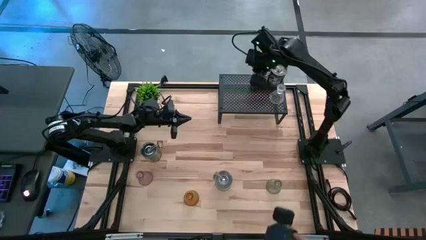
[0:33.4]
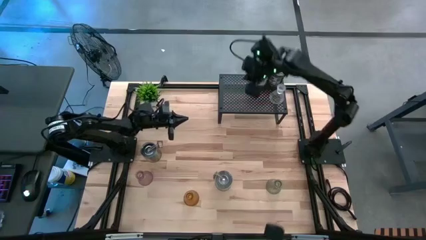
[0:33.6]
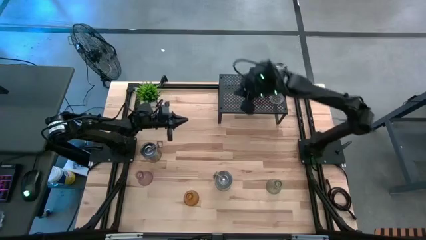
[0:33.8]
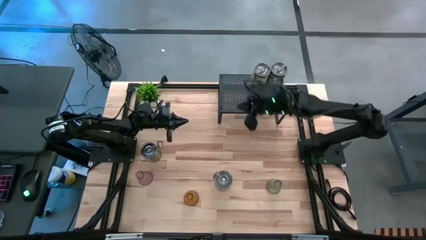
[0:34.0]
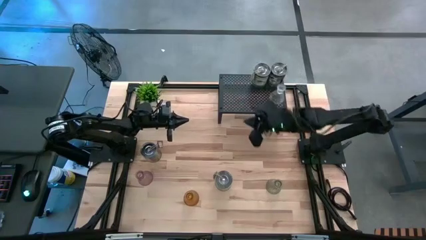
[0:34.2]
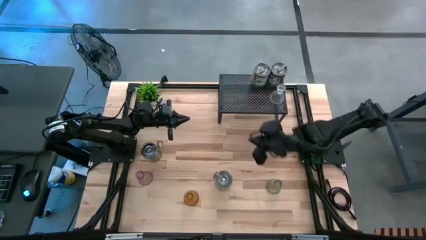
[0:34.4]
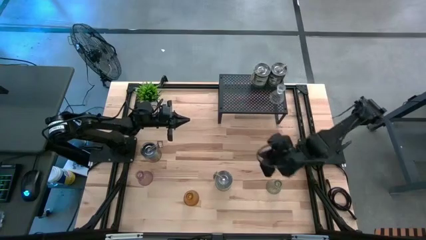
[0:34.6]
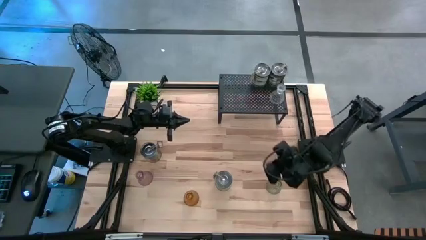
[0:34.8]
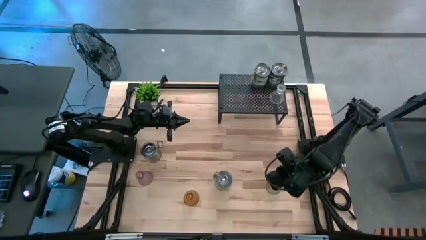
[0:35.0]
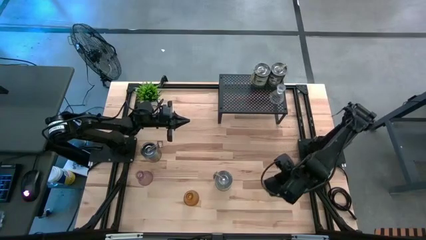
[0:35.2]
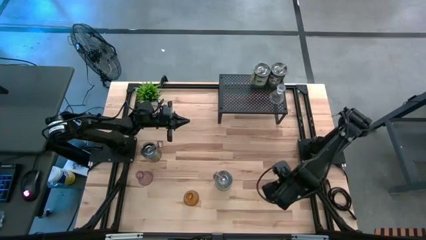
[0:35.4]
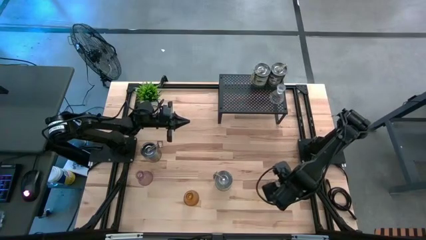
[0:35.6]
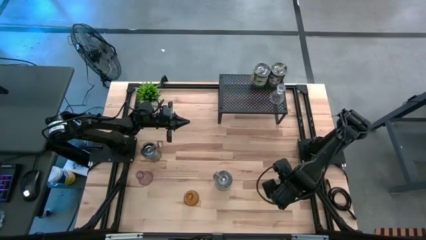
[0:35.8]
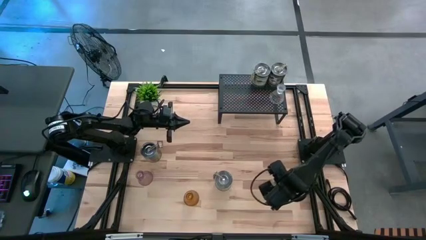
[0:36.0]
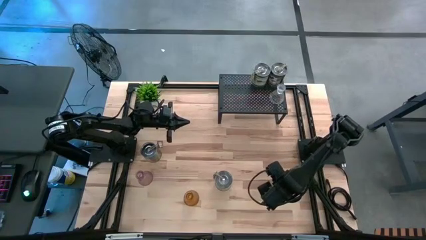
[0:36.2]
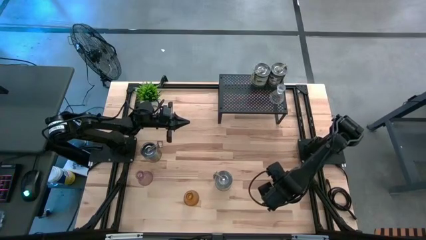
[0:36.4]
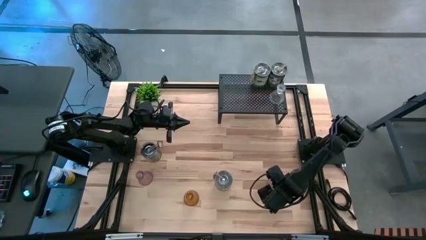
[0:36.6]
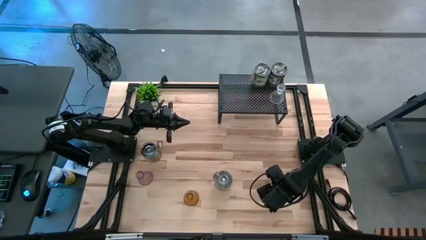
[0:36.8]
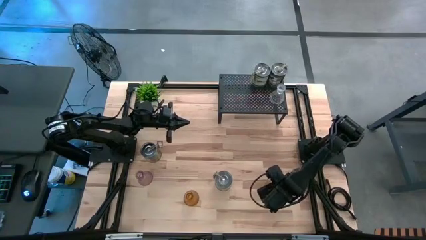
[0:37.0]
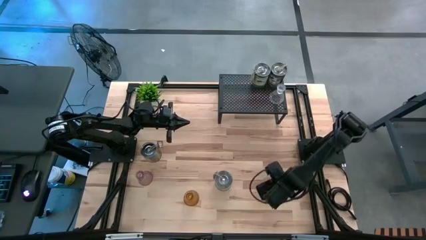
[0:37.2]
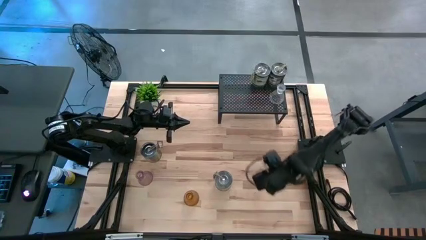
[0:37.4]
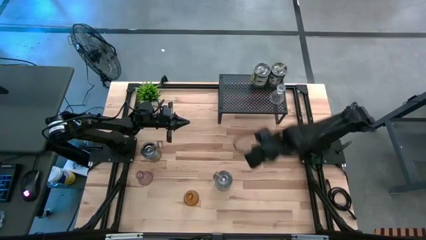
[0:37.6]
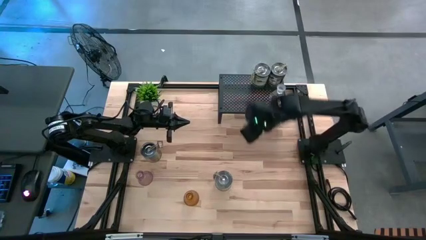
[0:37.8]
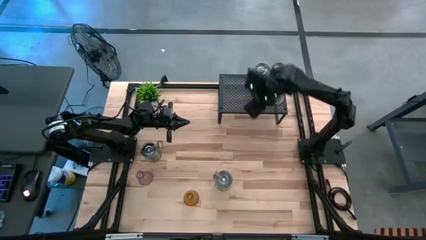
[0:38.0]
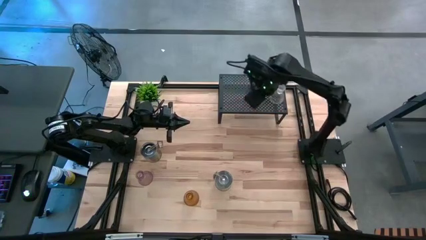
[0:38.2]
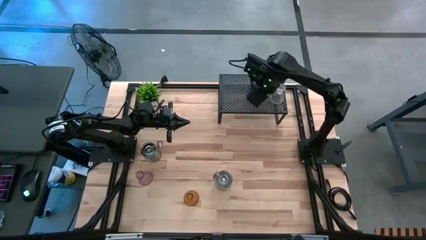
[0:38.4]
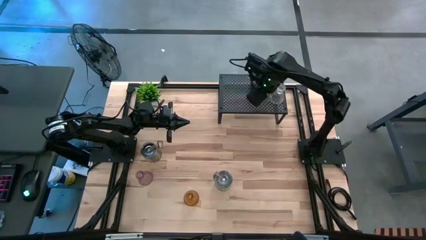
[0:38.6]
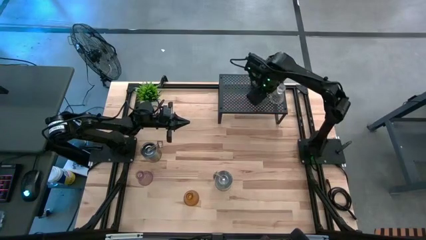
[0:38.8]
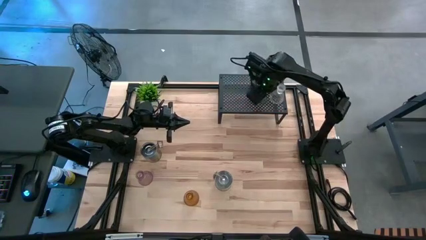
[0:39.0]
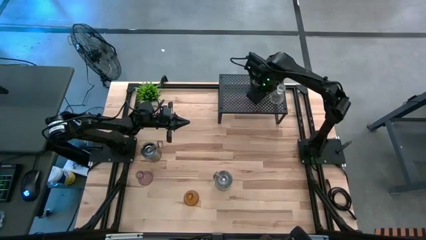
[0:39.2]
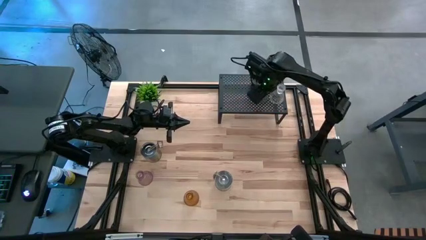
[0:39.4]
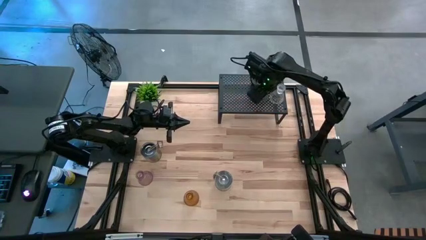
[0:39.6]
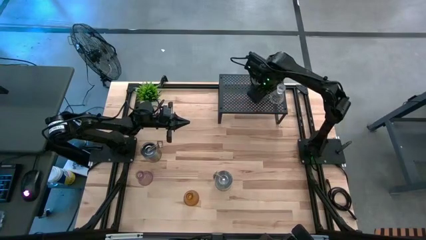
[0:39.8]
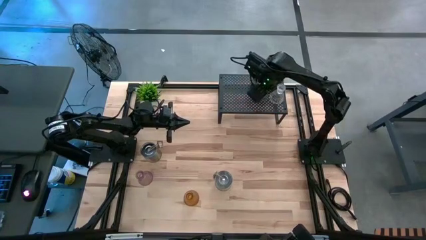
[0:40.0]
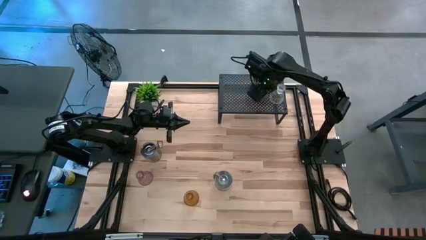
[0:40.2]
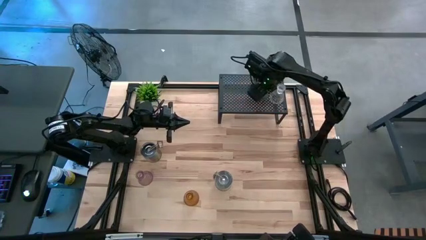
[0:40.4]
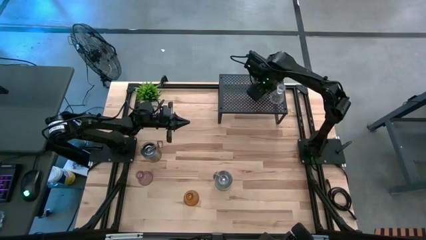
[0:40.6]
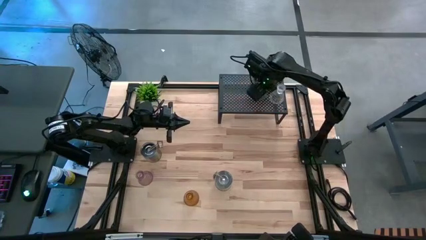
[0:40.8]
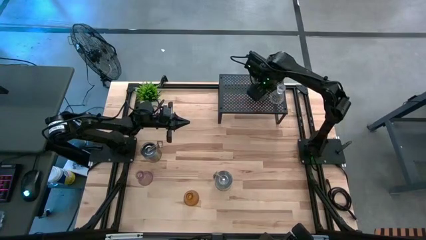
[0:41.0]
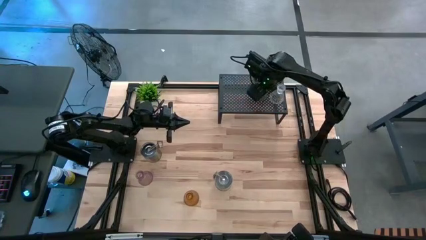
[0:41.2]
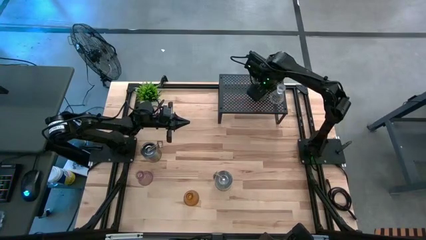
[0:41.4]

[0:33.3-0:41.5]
Task: Pick & Place candle stick holders
Put the green candle holder on the shelf

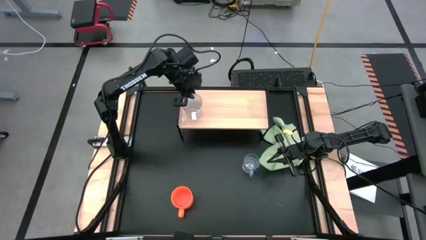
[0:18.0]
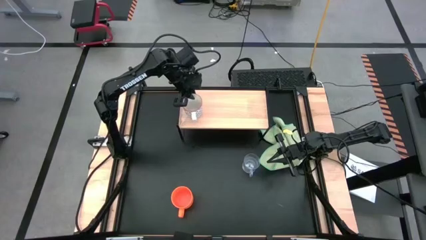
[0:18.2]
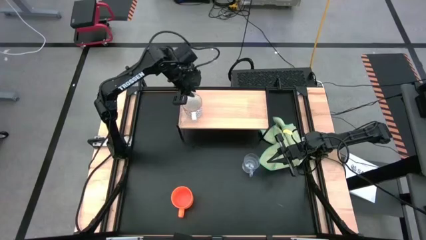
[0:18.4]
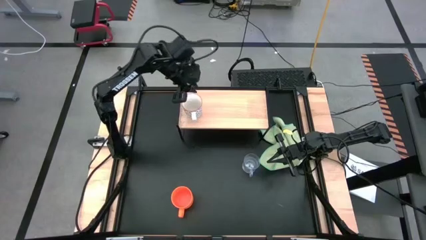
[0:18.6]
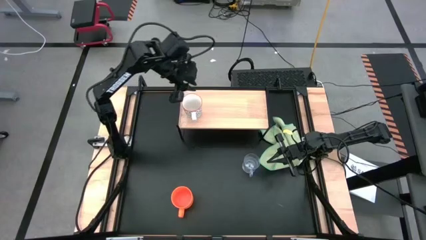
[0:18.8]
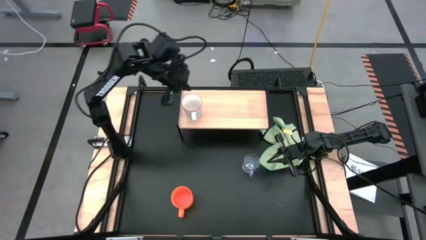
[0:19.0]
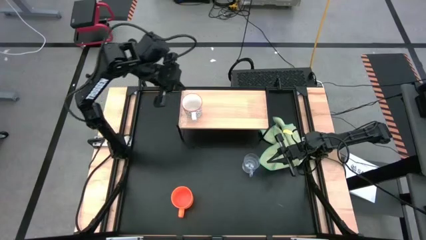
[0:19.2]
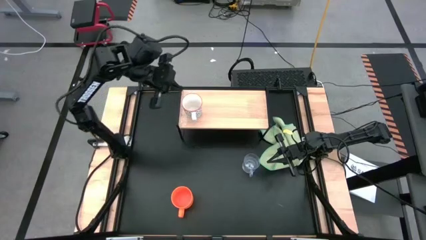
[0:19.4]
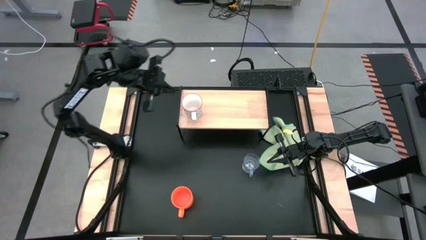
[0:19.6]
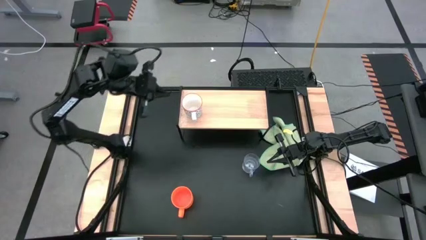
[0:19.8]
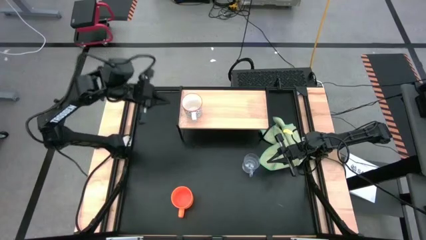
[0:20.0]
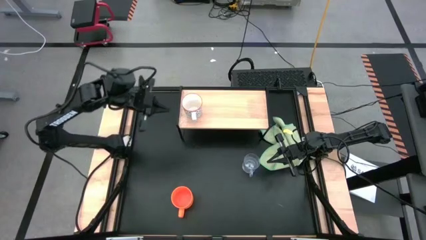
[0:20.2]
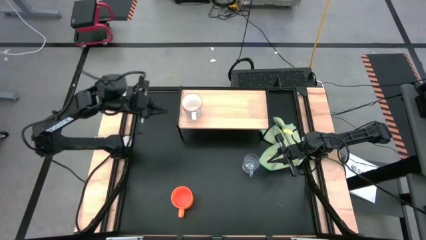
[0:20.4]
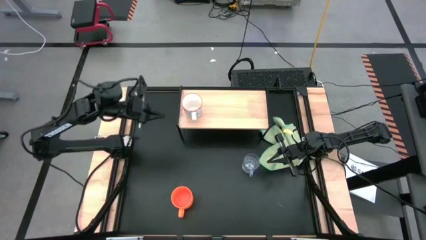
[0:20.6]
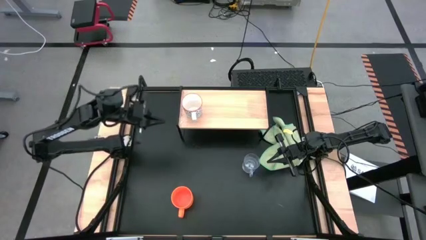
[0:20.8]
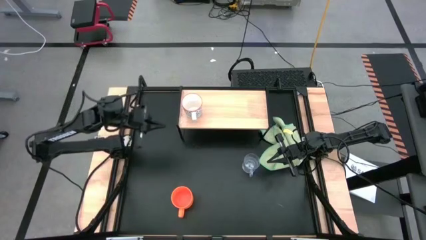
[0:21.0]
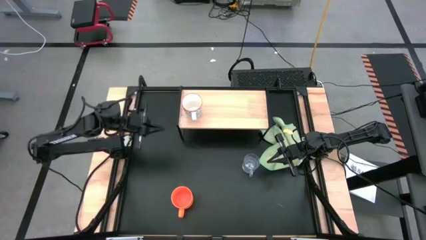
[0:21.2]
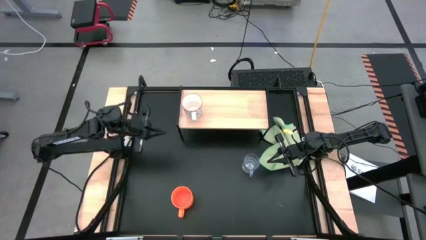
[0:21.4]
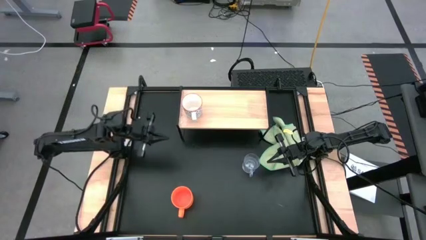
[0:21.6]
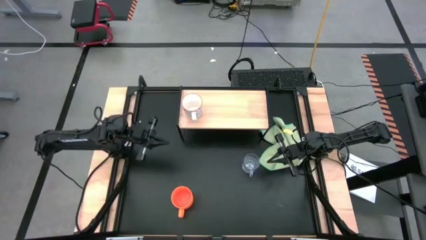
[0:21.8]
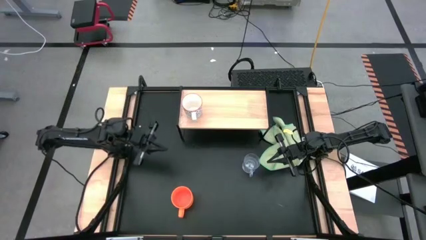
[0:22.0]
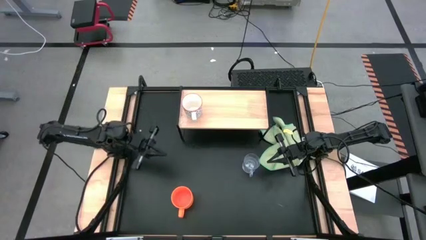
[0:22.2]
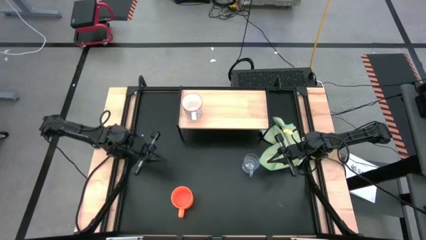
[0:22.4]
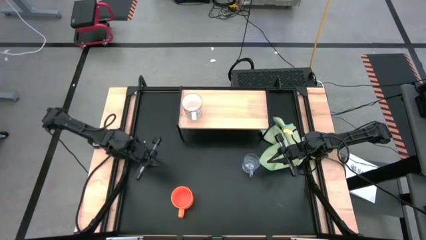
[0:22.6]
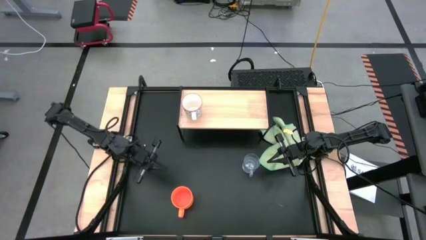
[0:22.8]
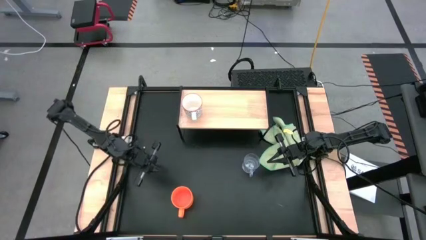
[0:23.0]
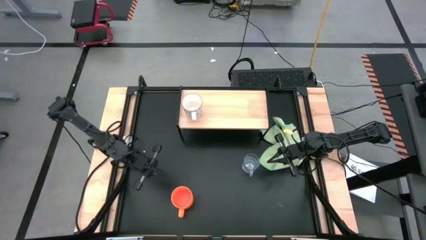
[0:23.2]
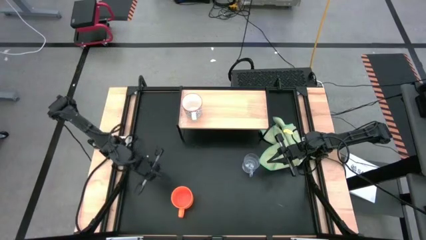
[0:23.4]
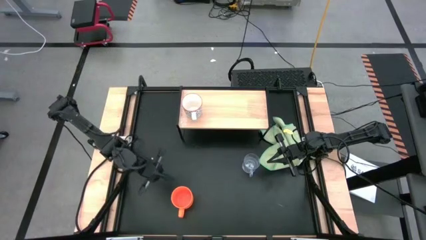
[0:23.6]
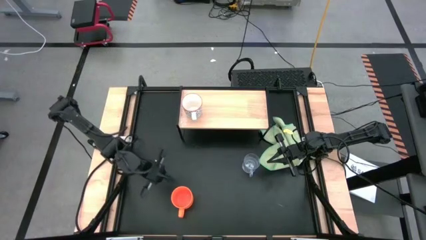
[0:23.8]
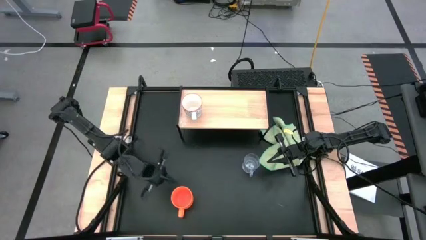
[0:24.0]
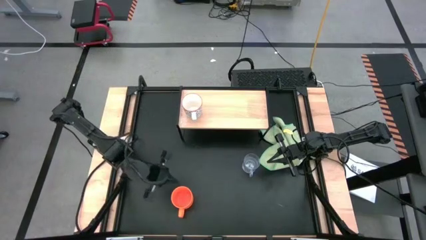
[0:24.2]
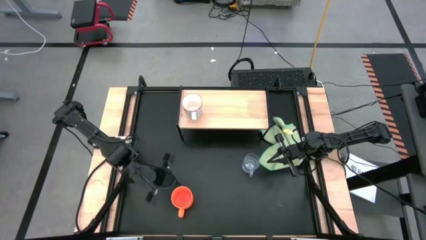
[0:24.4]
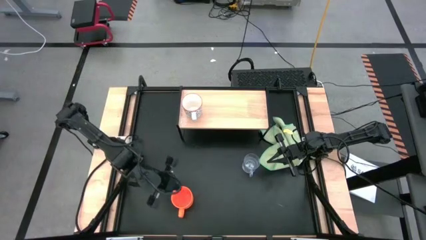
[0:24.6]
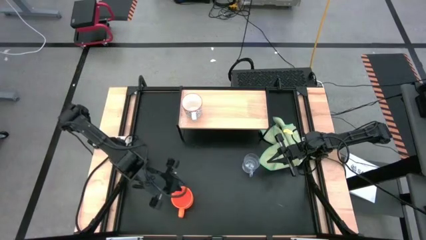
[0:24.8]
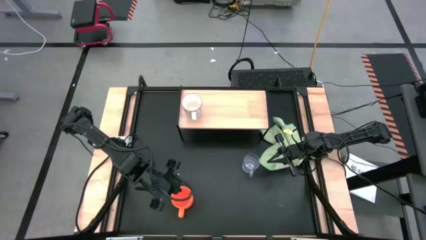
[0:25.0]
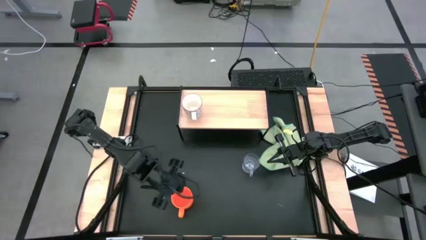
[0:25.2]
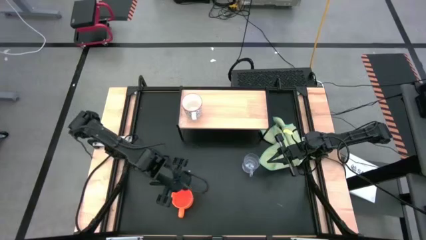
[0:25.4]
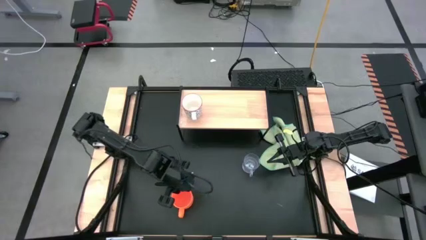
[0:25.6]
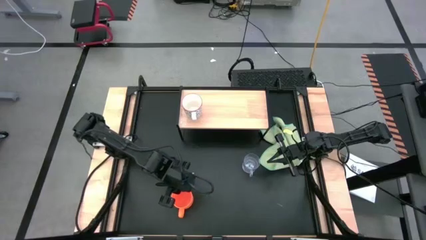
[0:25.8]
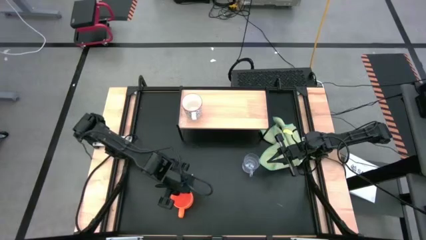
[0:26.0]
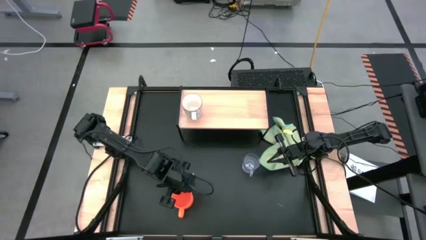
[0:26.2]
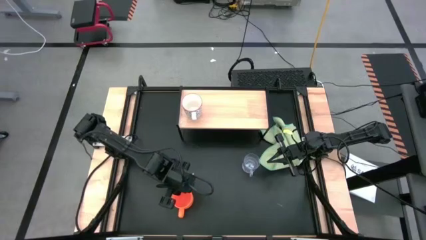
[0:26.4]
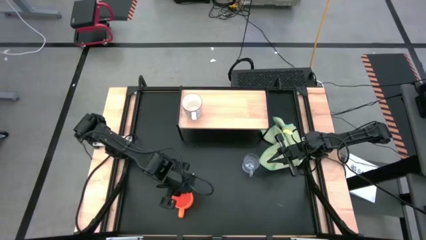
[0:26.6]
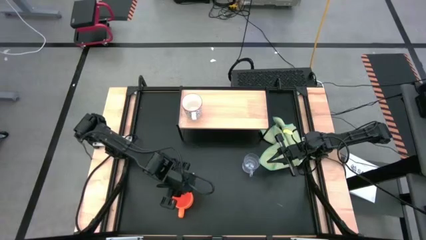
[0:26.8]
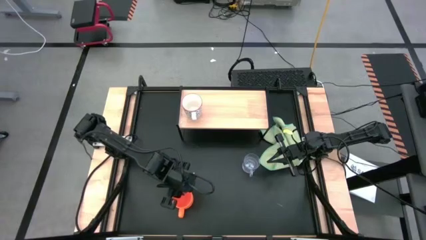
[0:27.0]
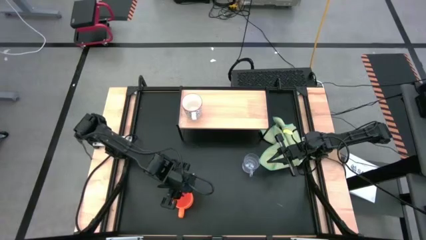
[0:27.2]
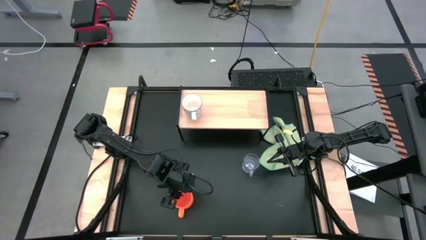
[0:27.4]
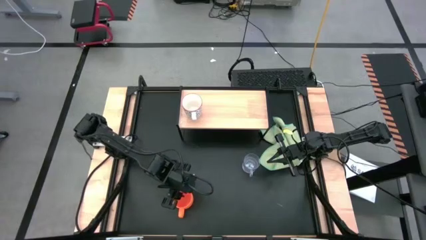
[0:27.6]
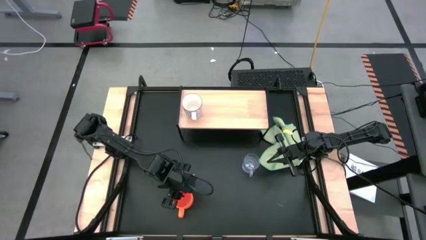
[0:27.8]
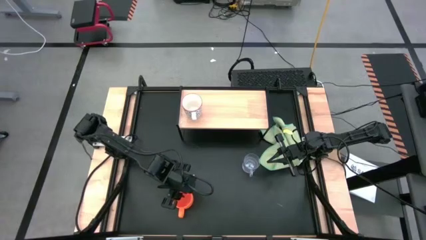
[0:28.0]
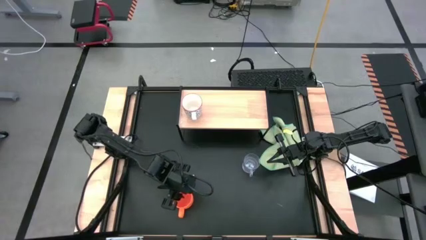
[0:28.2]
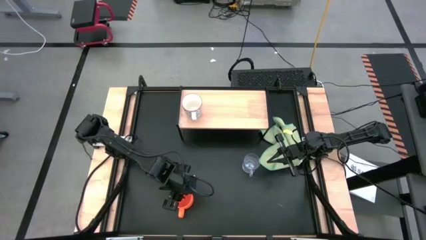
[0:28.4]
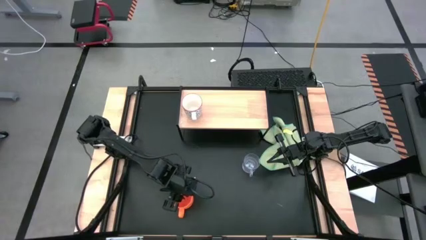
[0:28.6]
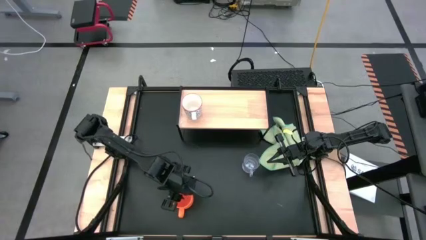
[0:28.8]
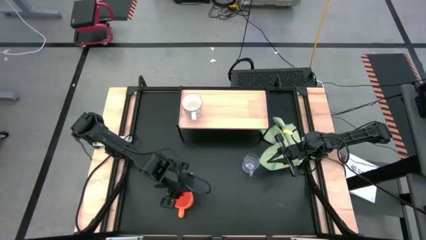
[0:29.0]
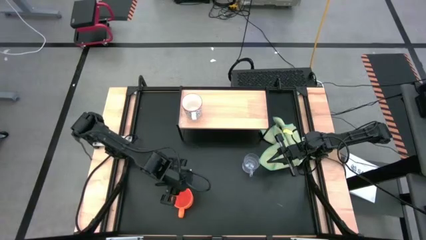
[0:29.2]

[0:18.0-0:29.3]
Task: Stack small to large cups/mugs on shelf
Put the orange cup on the shelf
